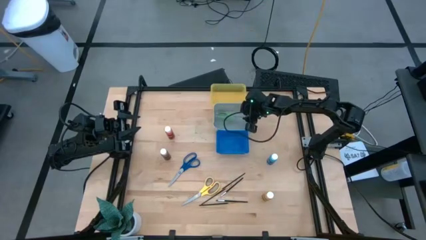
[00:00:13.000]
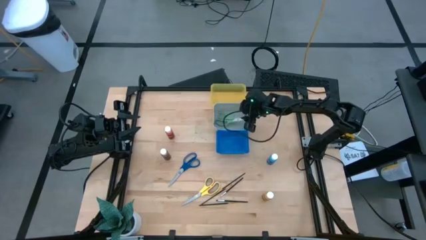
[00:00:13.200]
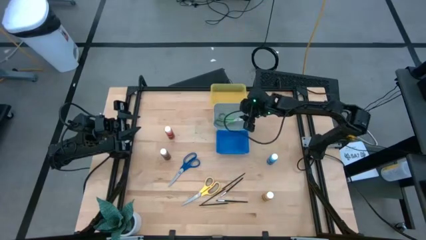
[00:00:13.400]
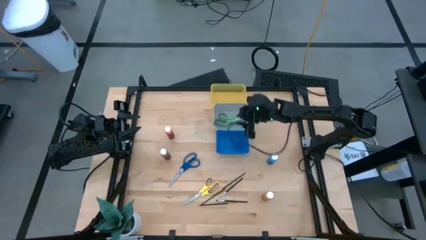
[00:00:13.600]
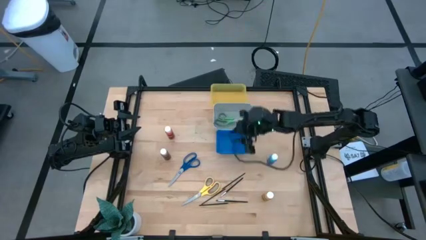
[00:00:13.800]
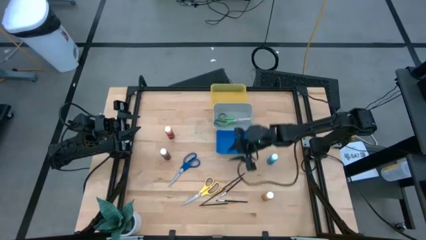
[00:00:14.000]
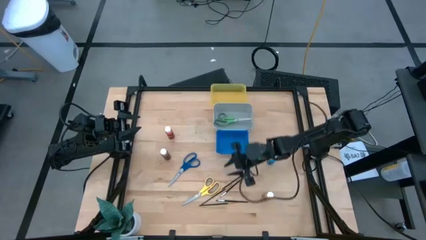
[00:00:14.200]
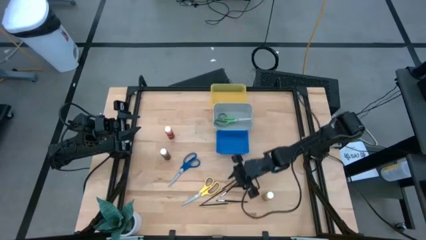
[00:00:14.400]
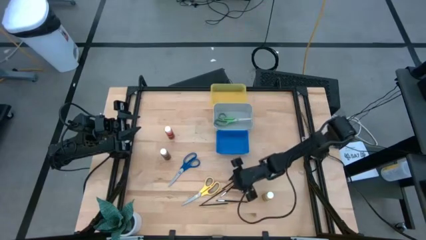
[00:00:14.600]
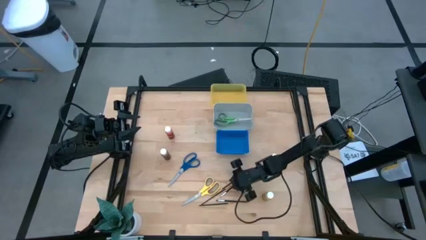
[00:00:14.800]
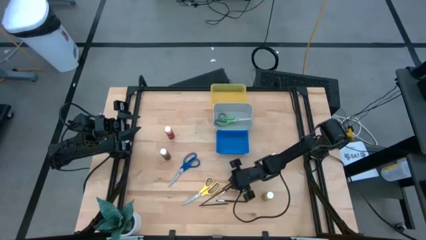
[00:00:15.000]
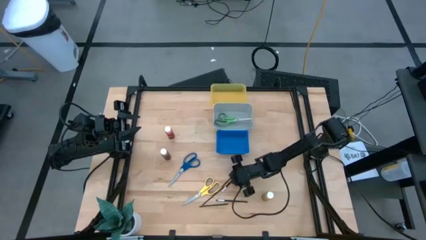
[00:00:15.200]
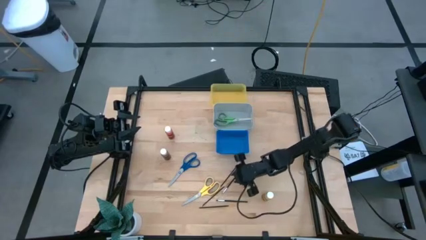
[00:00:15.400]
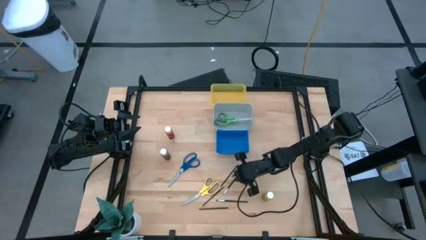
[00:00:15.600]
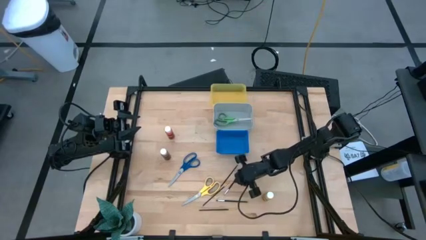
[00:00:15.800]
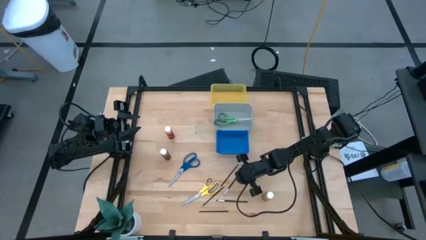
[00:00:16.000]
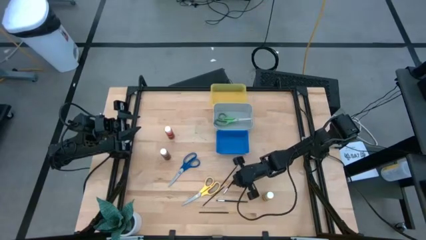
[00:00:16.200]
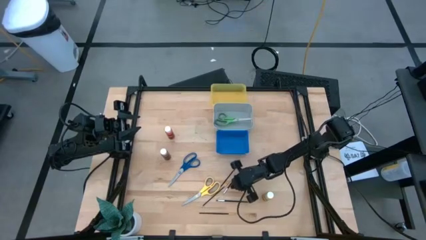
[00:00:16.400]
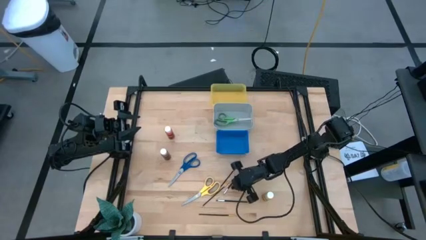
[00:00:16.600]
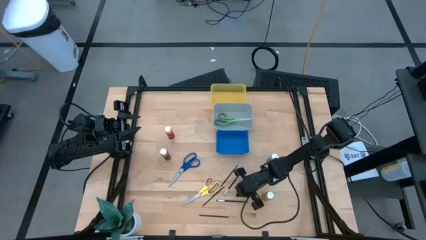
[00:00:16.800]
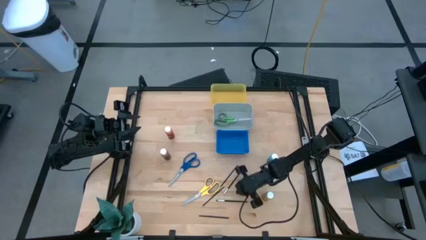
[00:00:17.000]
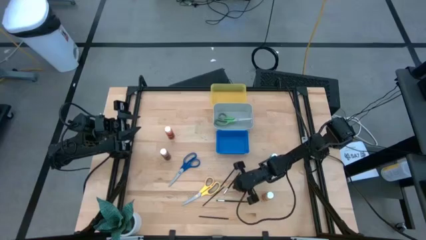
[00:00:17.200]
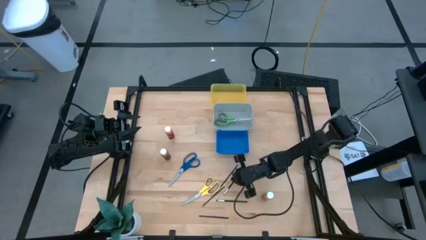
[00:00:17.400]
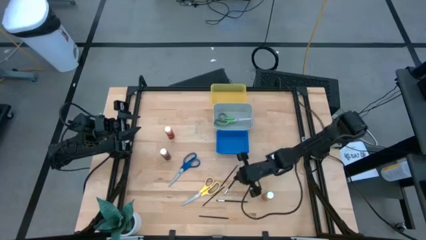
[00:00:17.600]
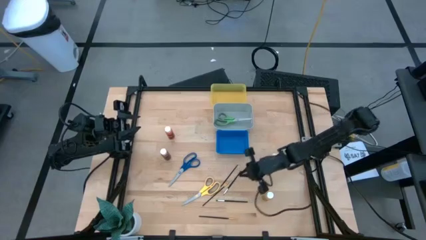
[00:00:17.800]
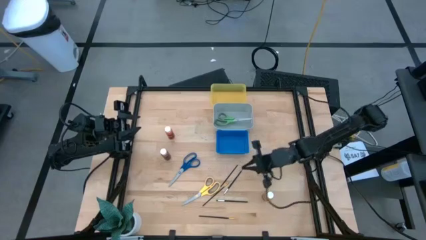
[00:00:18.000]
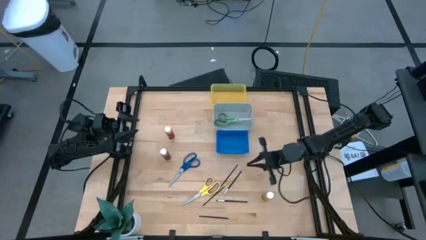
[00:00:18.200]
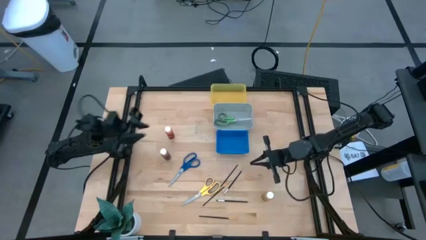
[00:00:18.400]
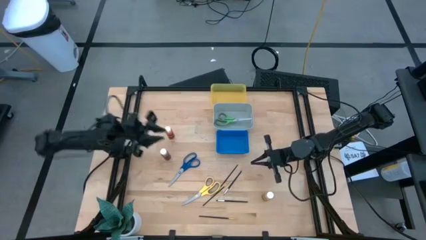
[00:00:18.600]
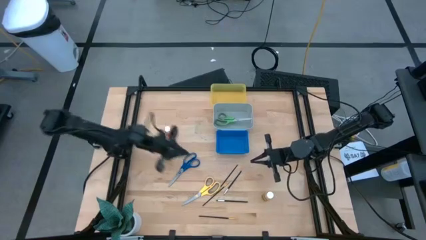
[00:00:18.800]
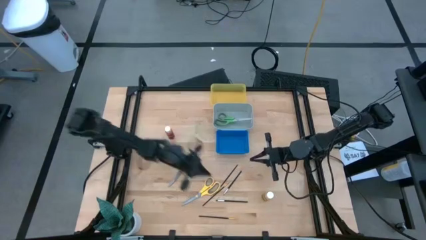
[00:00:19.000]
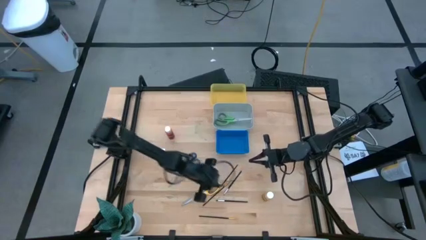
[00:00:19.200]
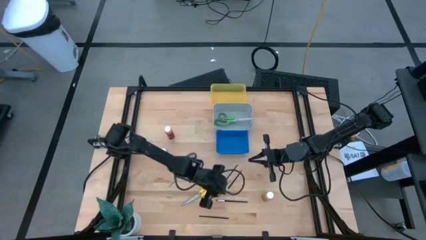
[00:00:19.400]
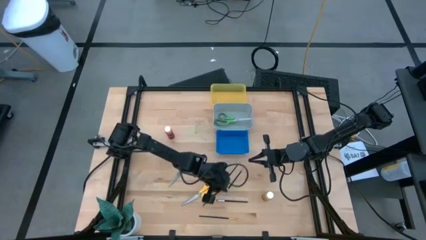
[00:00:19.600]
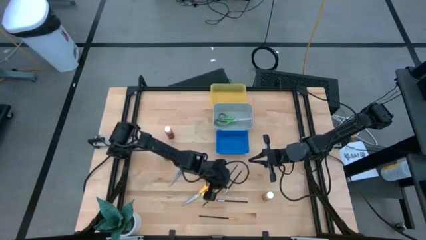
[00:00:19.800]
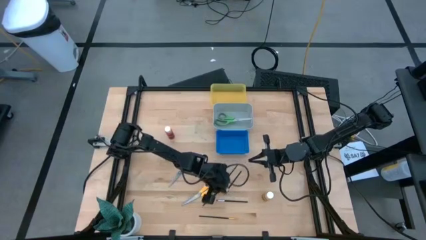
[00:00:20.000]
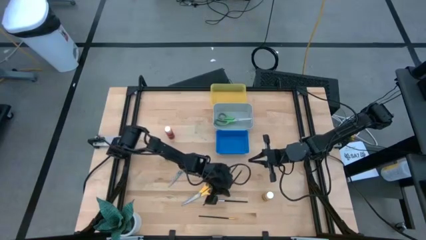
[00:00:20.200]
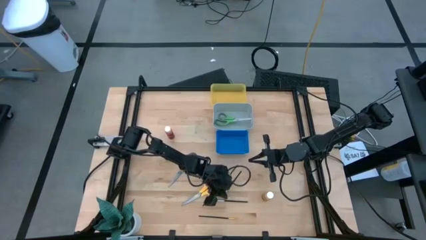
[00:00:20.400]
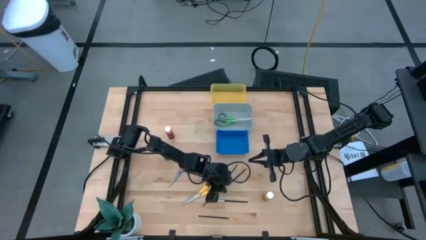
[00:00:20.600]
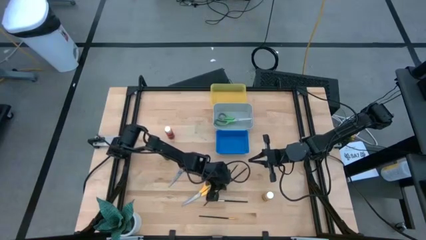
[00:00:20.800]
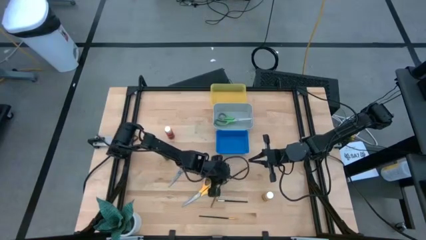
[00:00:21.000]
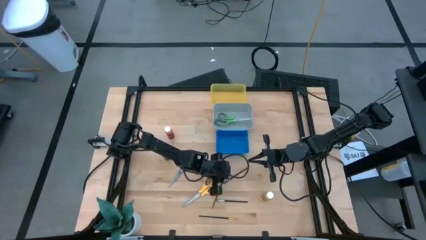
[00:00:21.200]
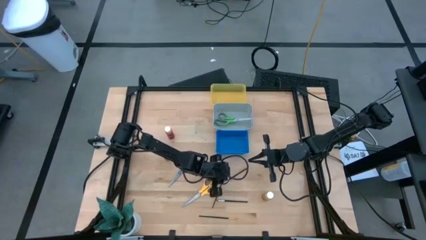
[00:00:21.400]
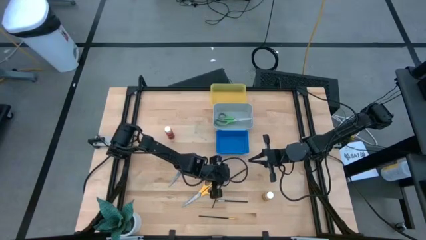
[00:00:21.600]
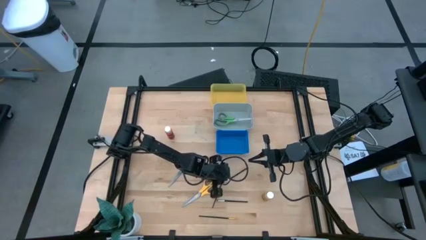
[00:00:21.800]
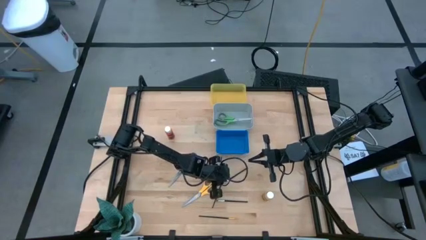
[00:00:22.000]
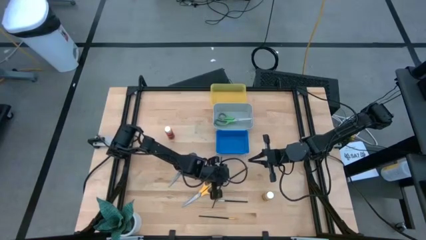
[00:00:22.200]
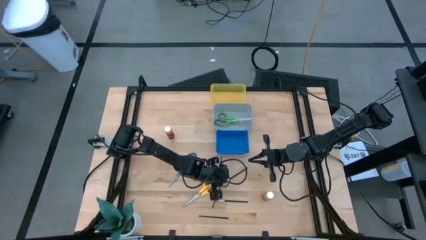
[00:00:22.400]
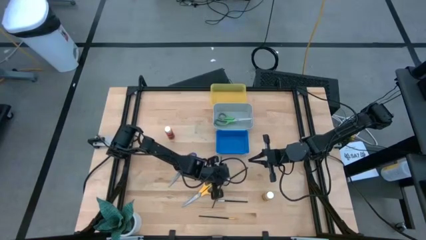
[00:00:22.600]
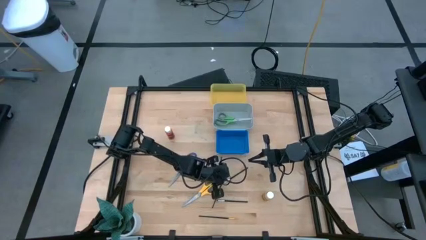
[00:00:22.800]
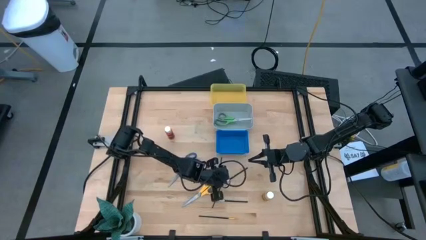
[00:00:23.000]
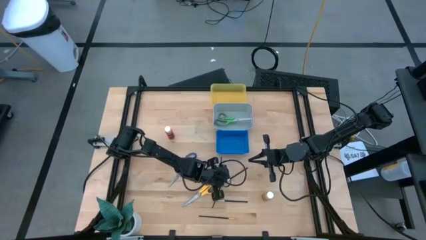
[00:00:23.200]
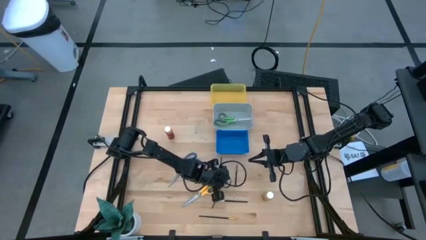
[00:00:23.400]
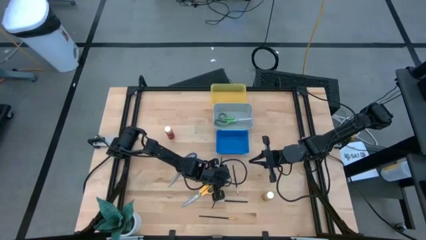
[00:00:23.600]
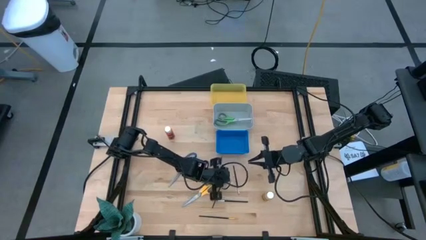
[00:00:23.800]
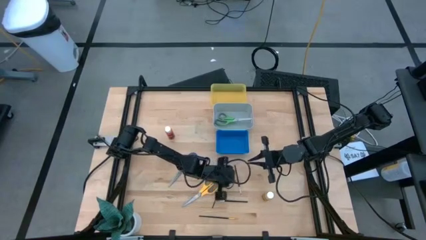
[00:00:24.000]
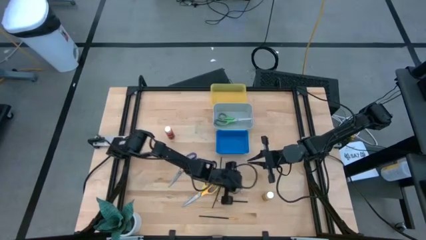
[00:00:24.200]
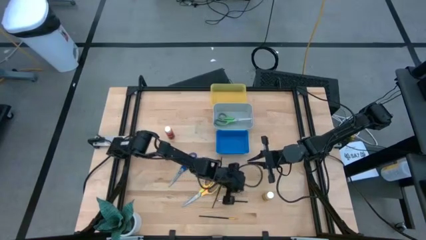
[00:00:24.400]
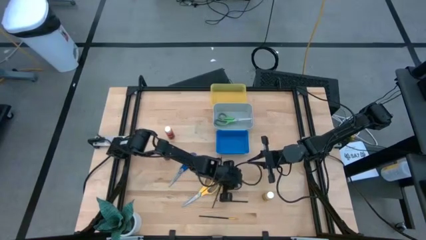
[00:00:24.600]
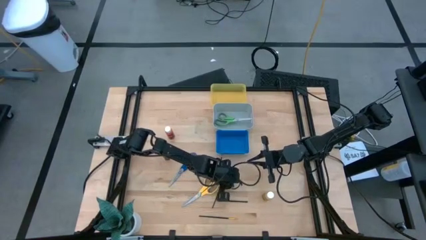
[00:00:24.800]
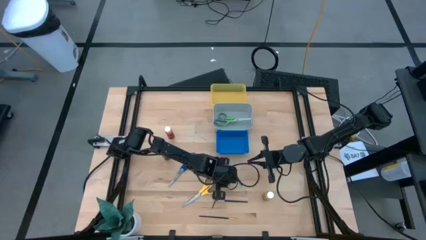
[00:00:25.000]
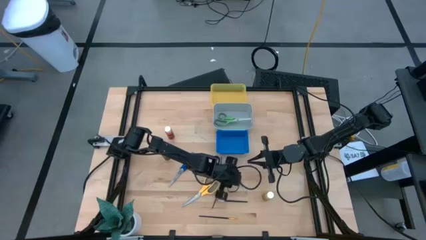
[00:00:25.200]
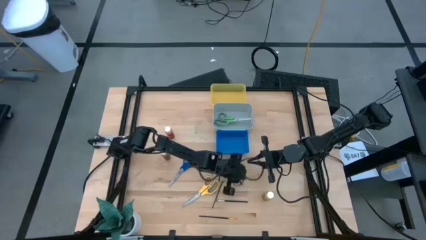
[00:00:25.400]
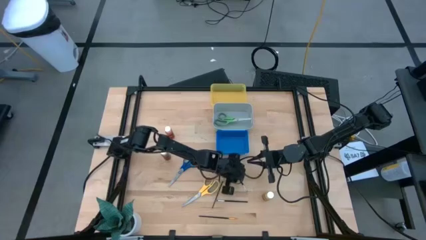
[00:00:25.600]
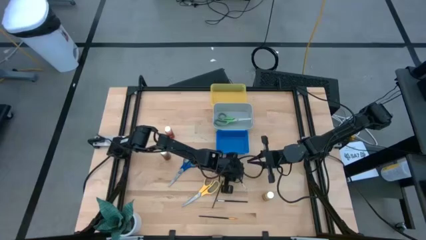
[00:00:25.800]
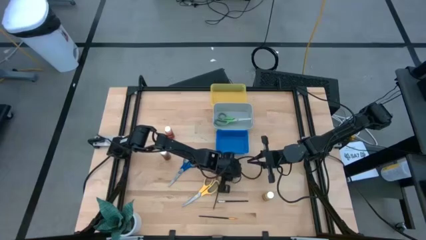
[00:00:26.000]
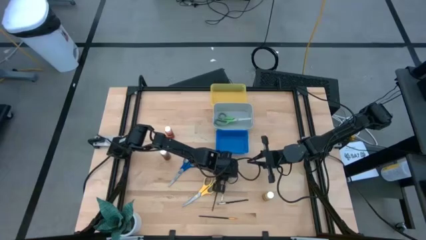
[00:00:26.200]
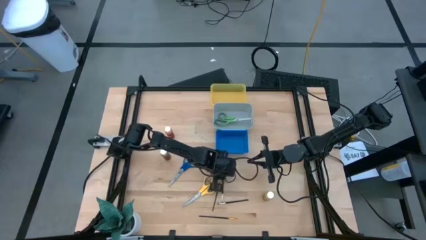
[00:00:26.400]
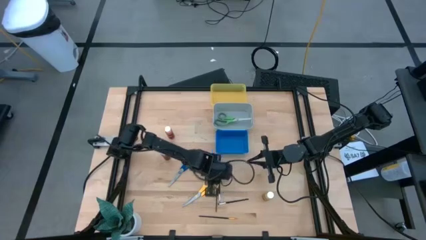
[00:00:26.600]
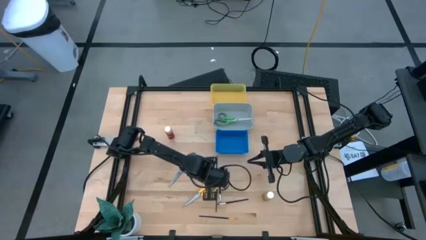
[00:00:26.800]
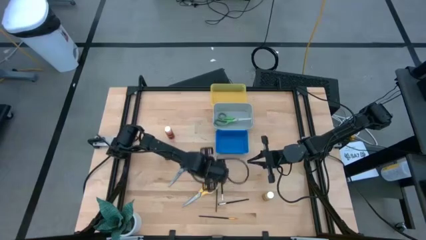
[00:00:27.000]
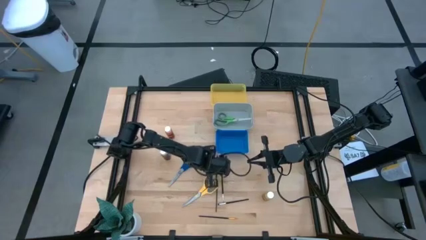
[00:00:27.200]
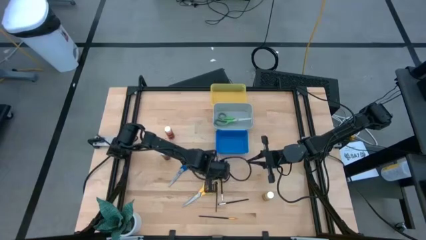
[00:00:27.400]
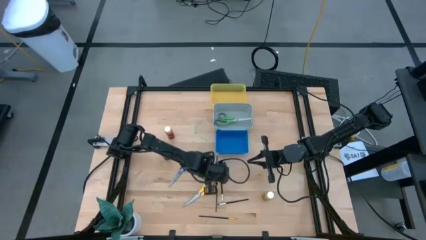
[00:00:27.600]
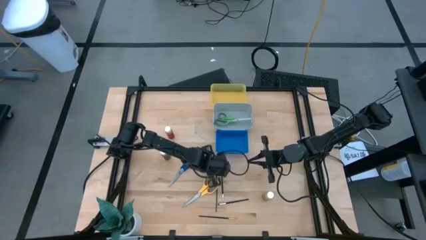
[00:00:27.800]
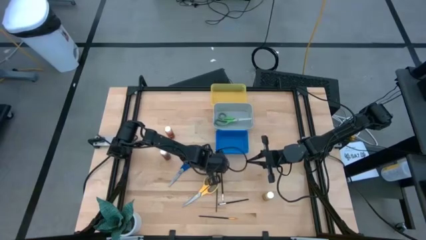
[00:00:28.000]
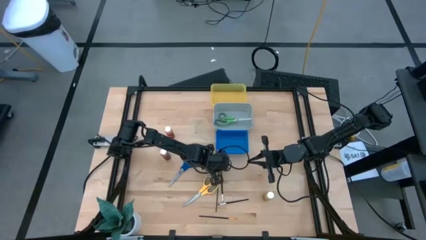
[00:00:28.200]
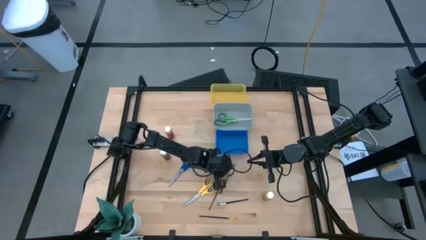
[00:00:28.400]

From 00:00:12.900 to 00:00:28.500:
Task: Pick & Place Paint Supplies
Adjust the paint brushes on the table

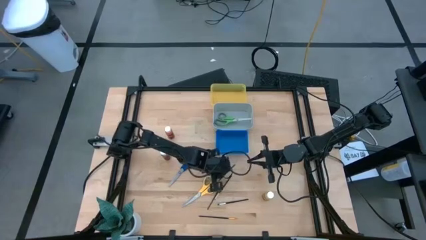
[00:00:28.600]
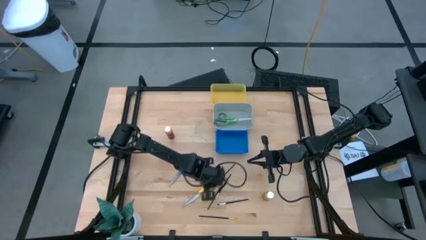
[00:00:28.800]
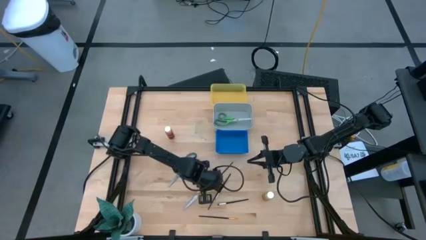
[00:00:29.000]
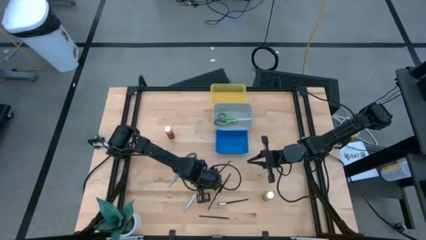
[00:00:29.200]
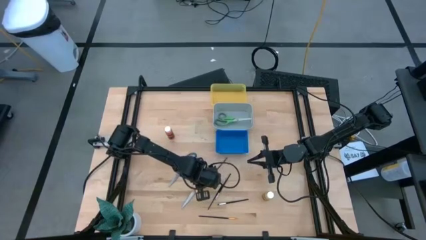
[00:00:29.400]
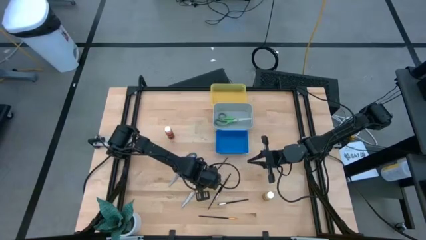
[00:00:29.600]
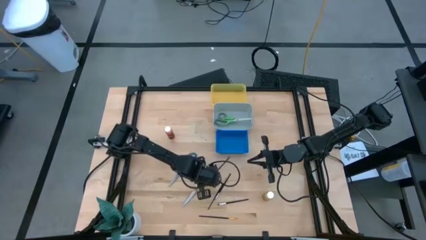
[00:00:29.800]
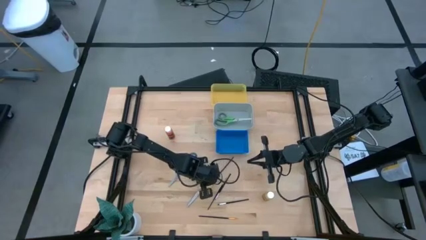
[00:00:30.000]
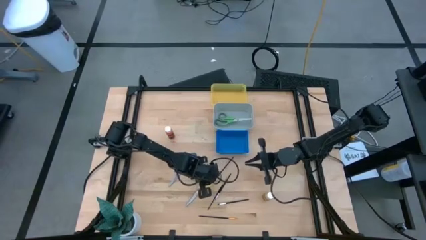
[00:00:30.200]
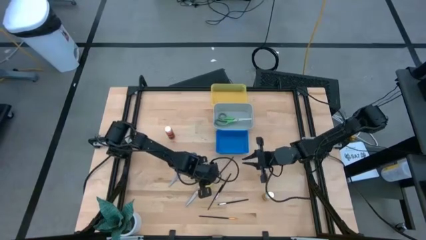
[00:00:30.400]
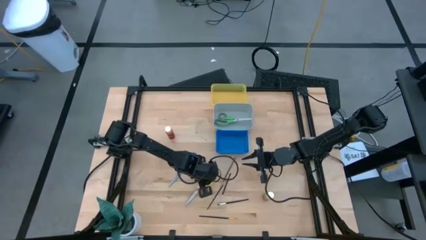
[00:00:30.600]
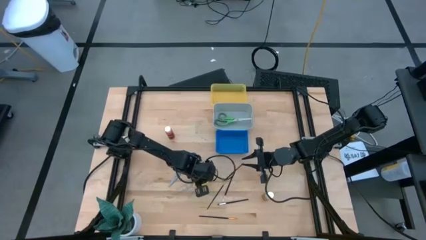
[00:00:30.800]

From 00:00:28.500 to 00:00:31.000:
Adjust the yellow scissors on the table
